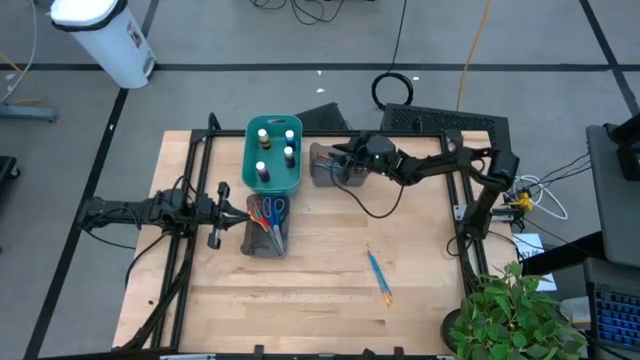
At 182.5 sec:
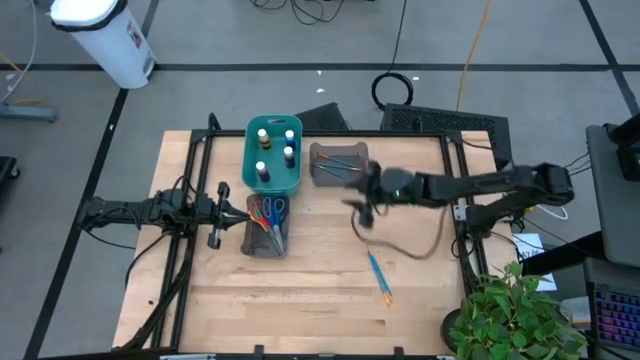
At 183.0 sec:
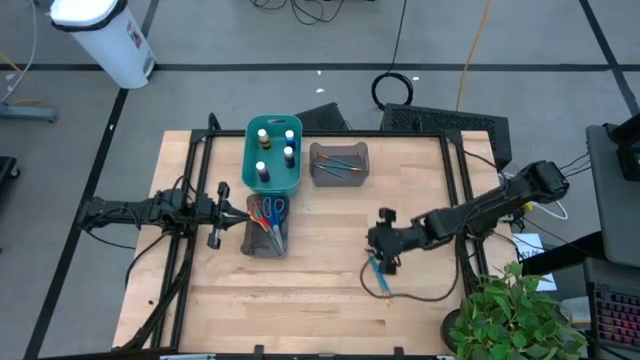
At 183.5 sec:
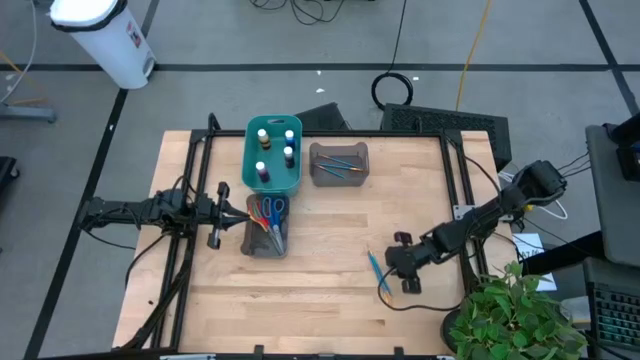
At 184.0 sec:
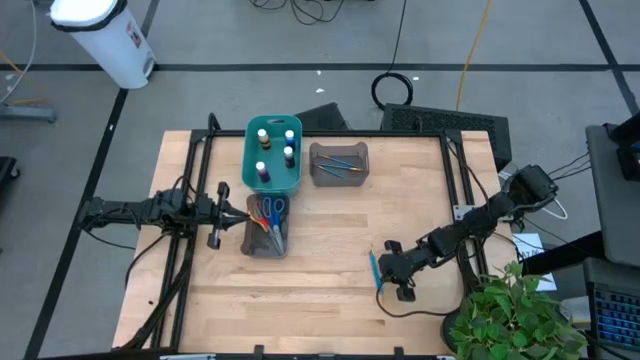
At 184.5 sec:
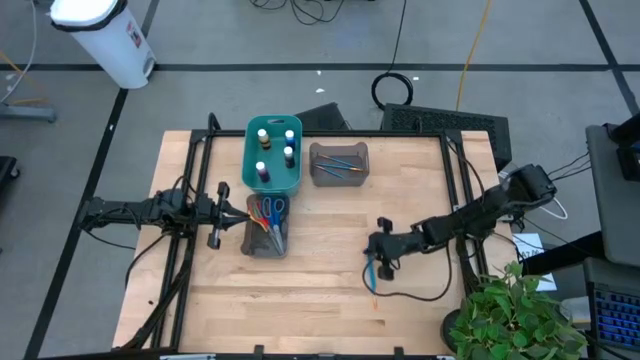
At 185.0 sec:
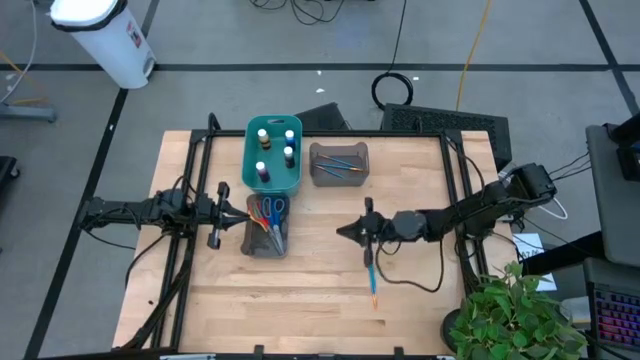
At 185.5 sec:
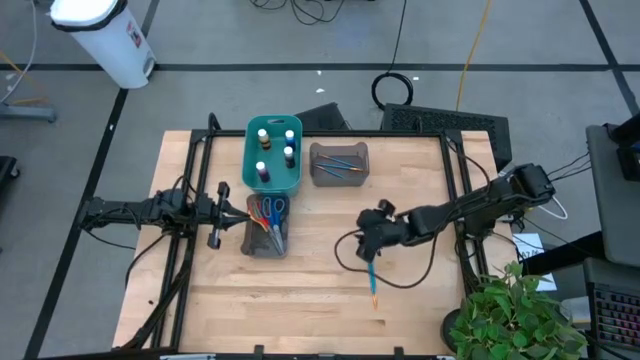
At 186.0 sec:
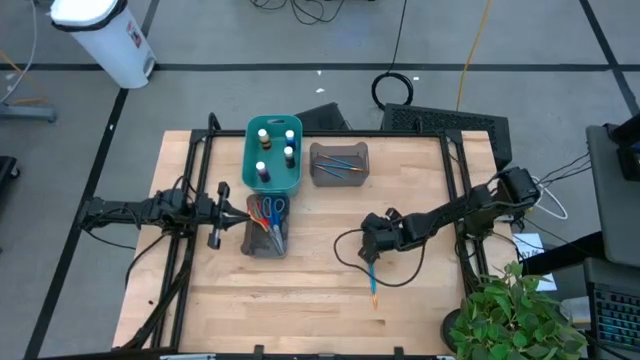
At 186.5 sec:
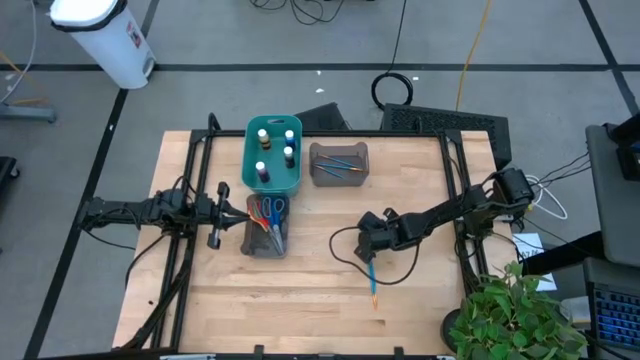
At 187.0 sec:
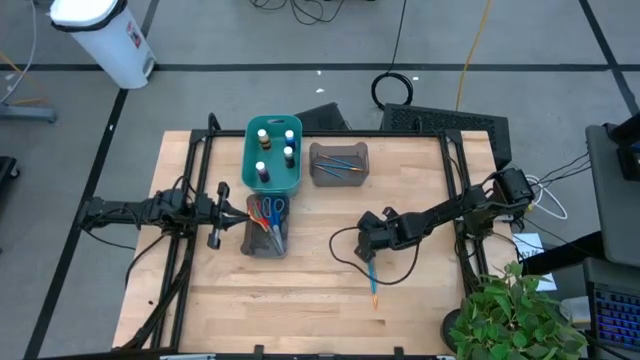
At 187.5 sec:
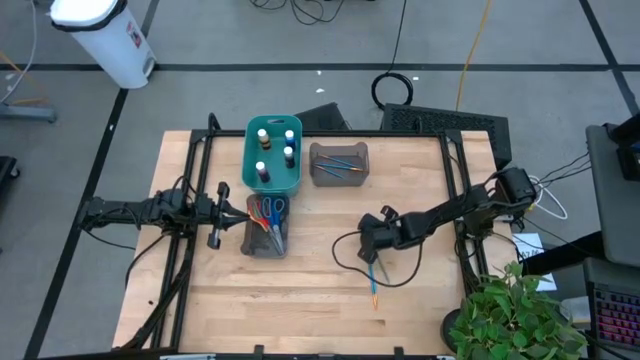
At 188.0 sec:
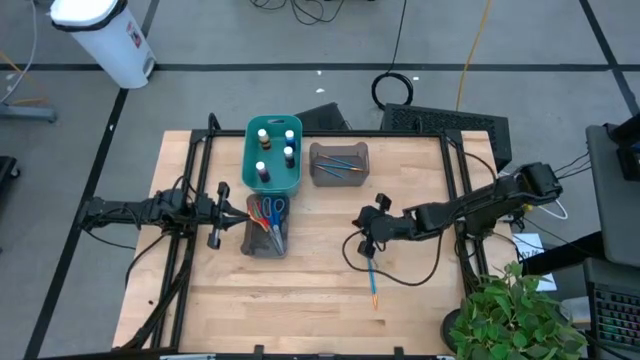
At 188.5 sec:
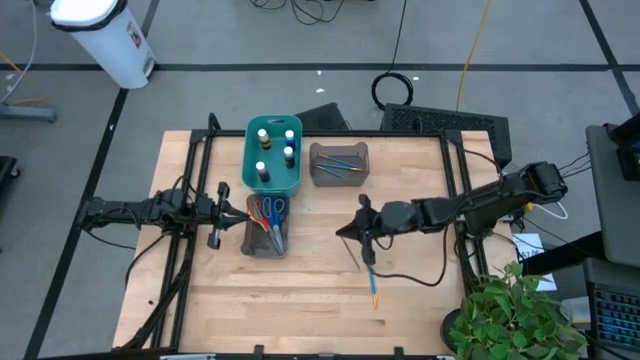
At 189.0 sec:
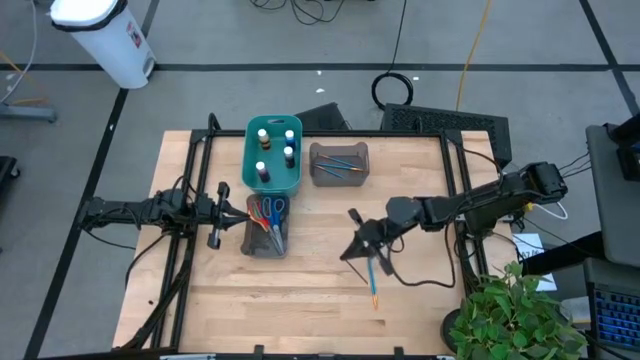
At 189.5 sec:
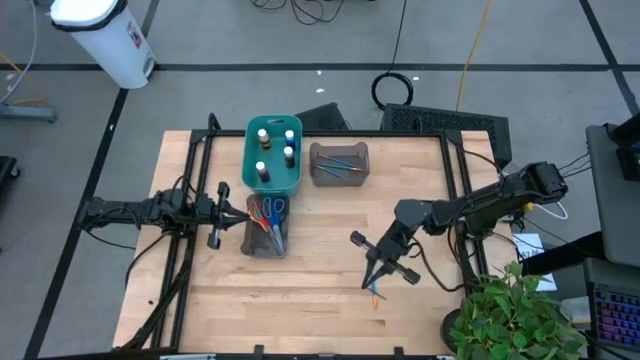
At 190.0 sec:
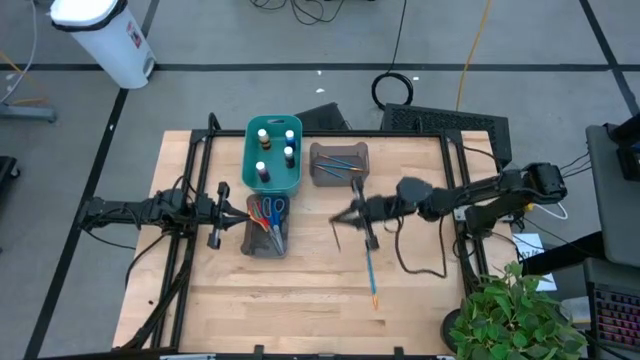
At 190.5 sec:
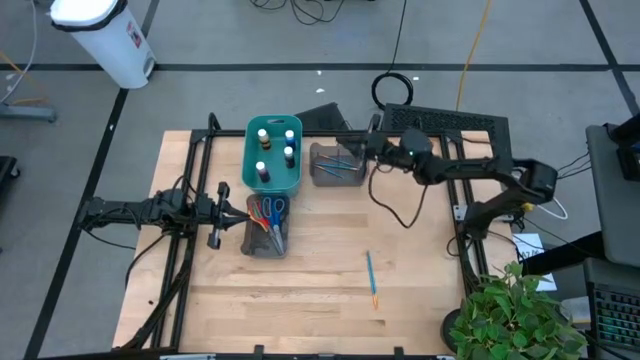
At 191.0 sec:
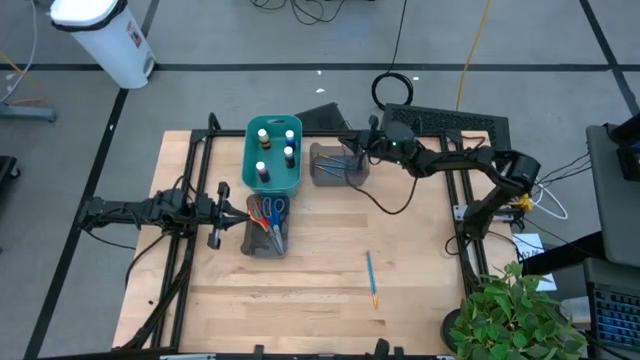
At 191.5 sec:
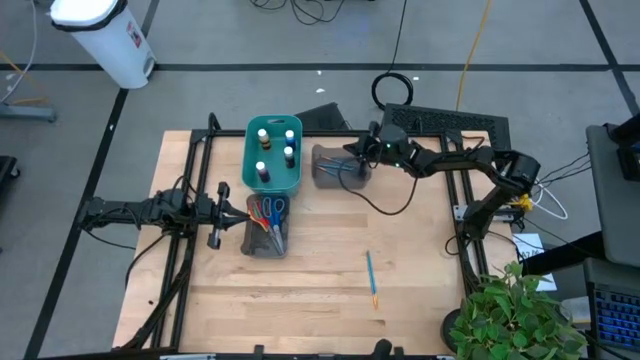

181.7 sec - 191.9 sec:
Task: Pick & Place Paint Supplies
Put the blue paintbrush into the top black bin

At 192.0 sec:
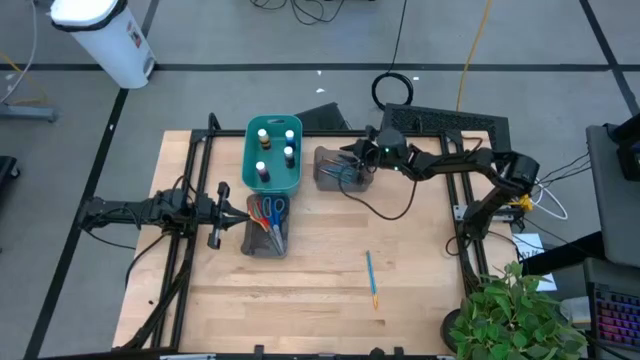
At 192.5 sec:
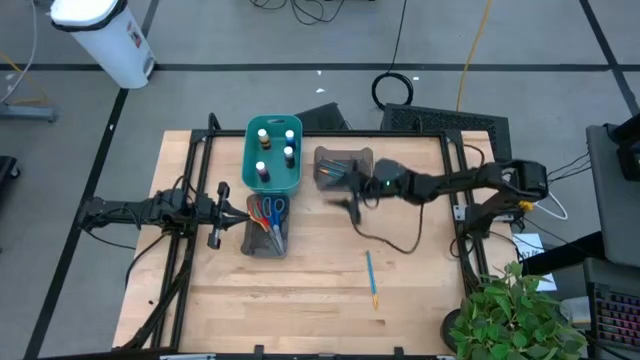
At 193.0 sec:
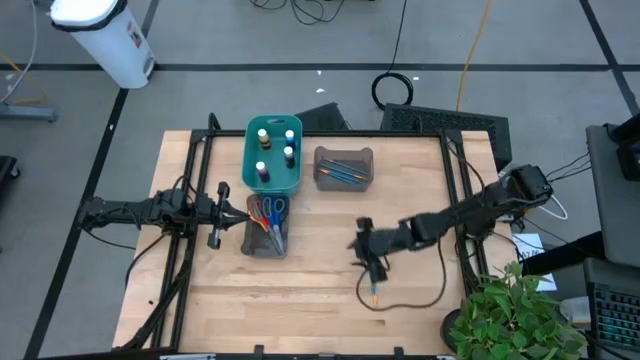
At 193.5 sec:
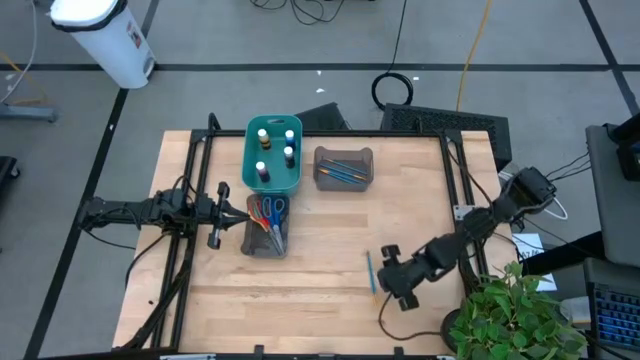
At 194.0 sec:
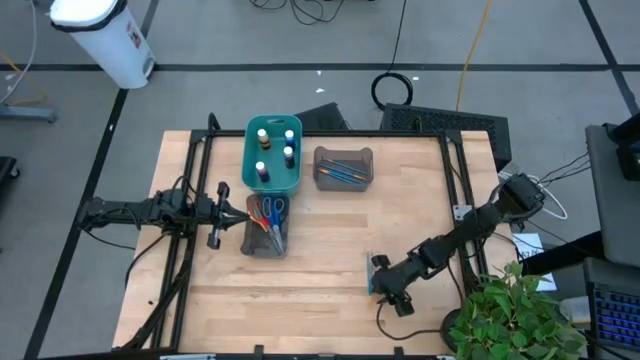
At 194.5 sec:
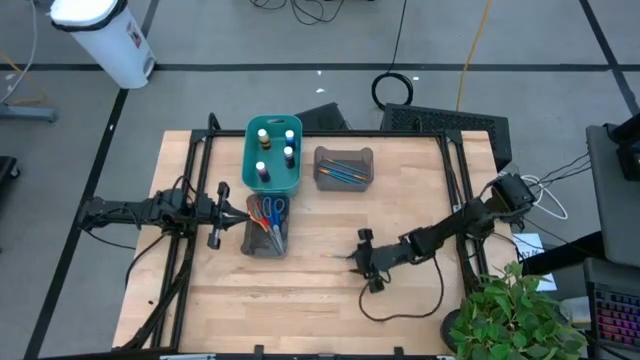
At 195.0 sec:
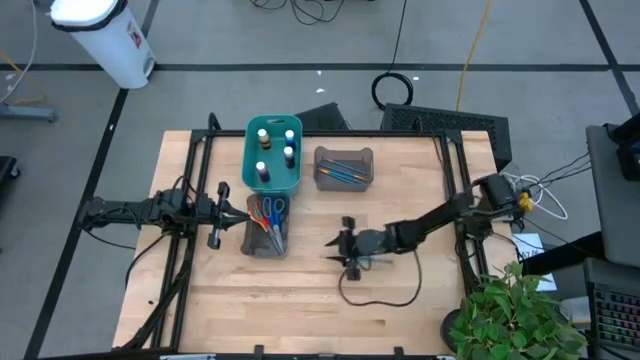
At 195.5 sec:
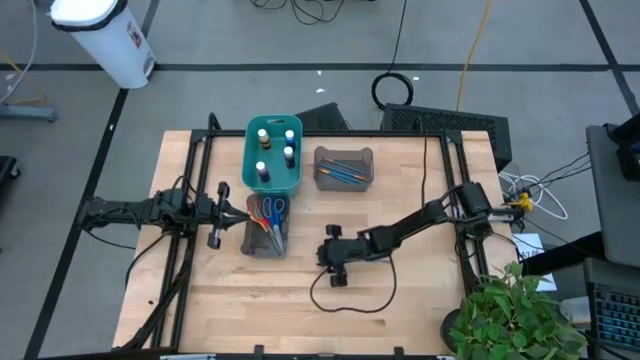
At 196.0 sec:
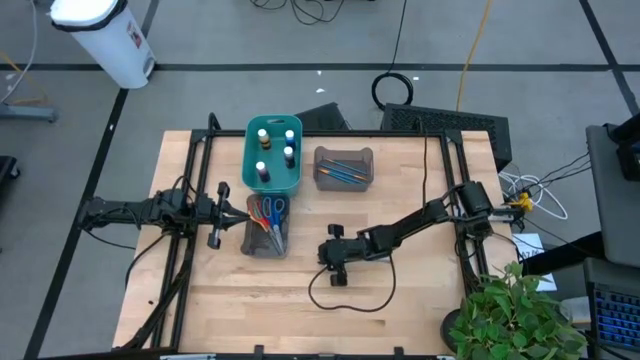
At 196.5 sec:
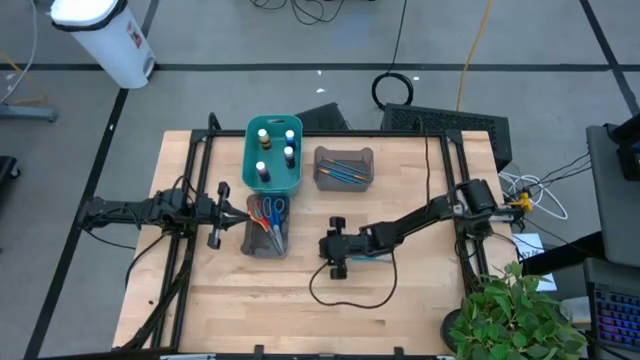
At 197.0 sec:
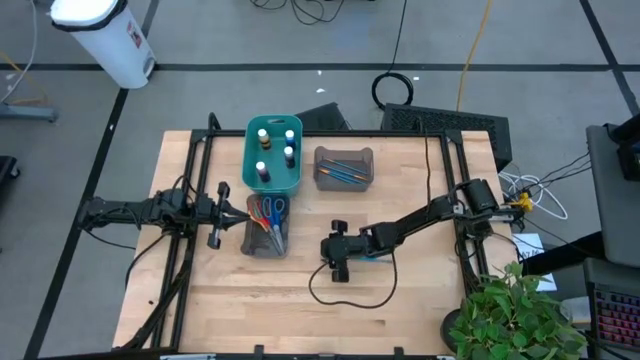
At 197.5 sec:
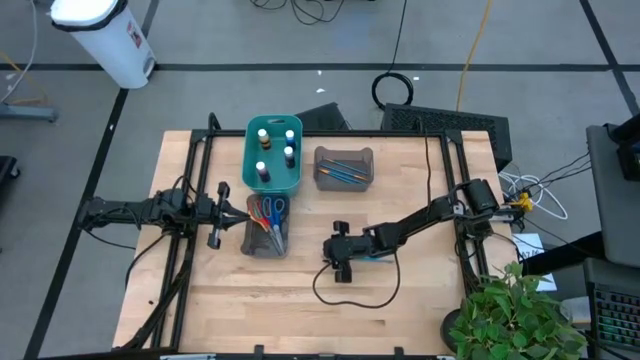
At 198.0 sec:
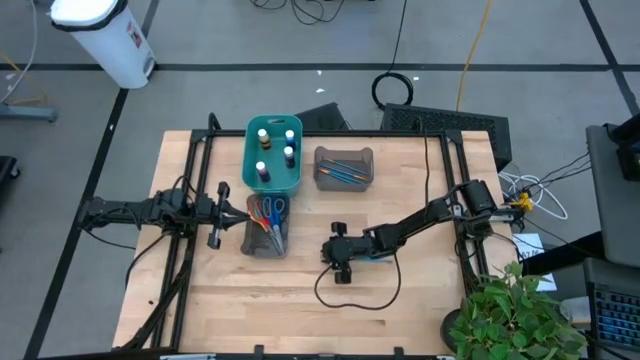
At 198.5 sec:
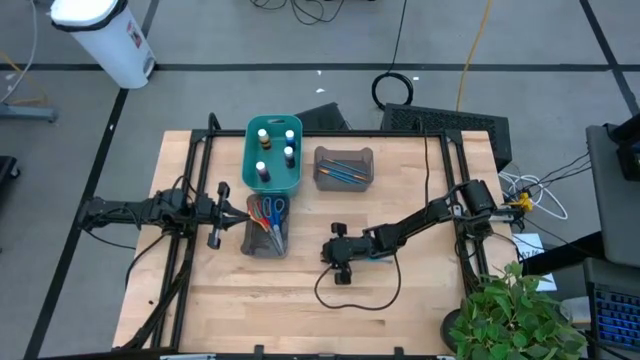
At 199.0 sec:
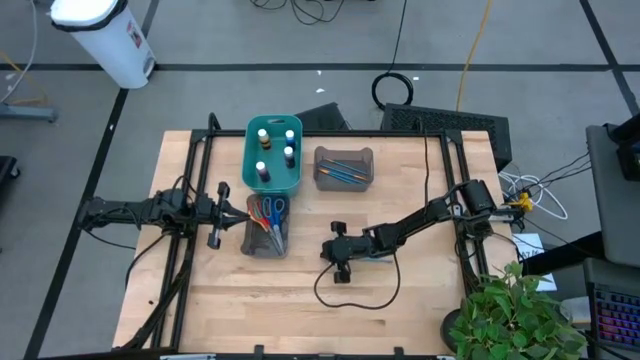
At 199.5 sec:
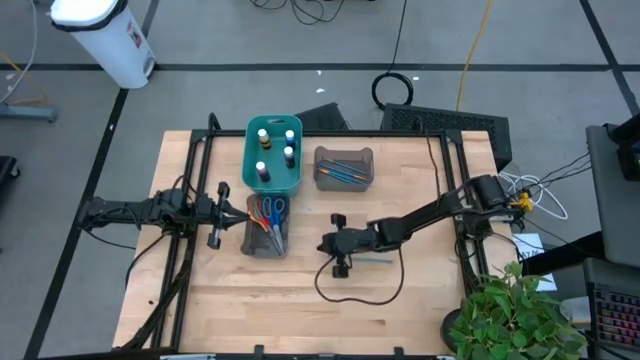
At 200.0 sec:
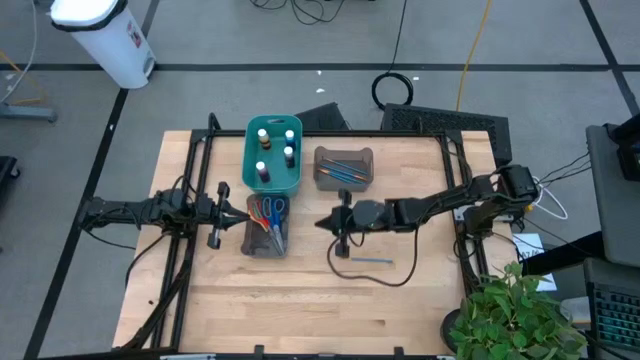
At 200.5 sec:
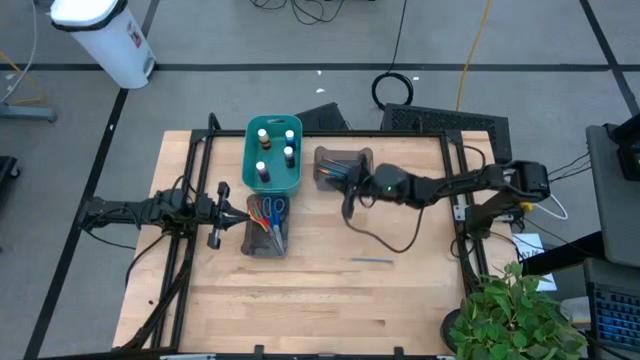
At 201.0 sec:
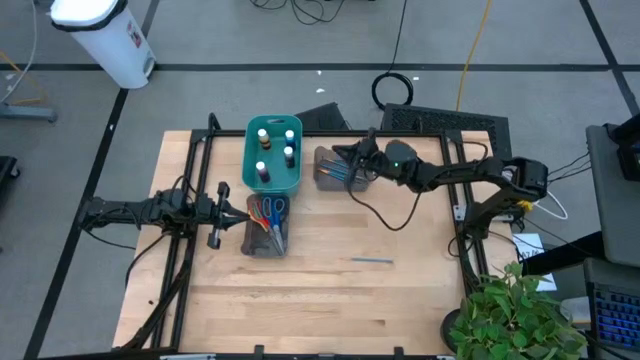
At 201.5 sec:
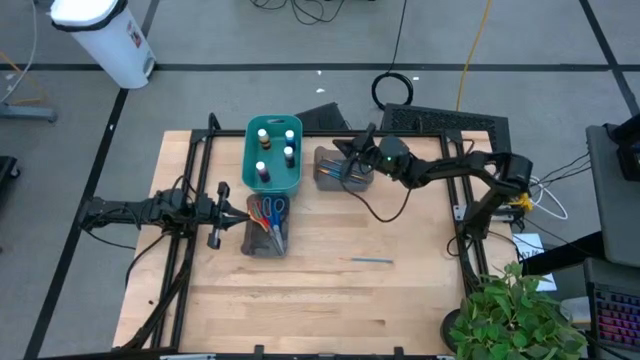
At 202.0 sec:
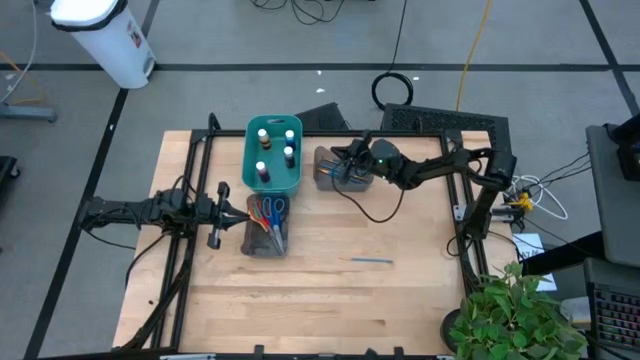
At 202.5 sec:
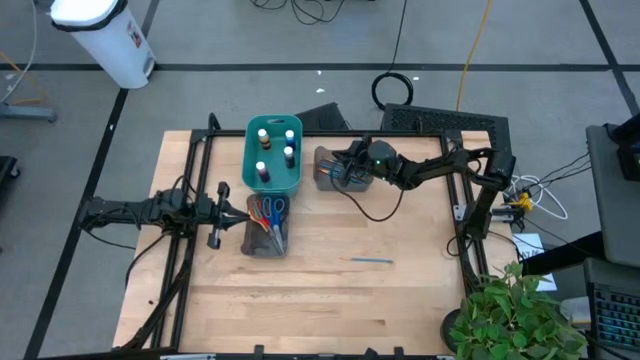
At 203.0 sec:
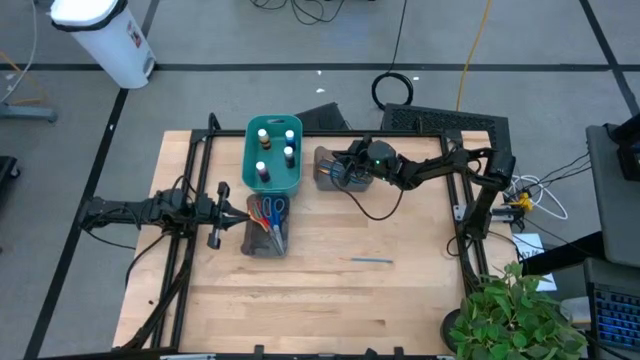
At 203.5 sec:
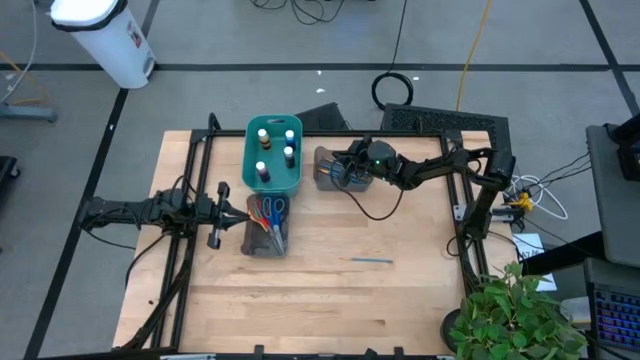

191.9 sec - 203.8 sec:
Put the blue paintbrush into the top black bin
